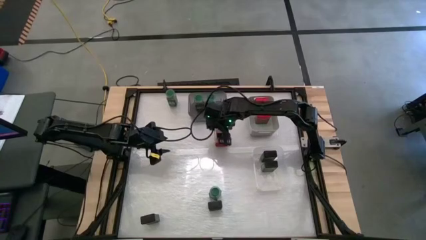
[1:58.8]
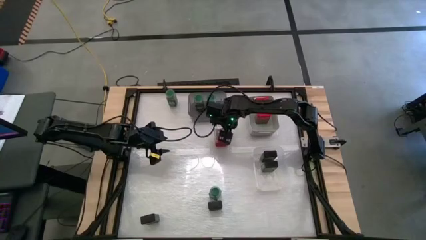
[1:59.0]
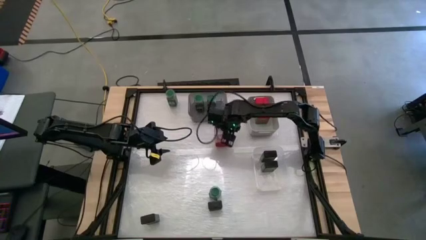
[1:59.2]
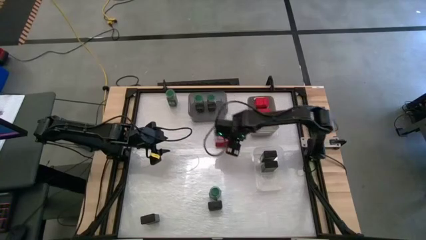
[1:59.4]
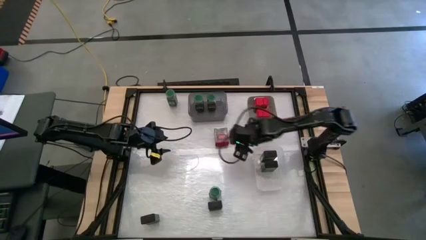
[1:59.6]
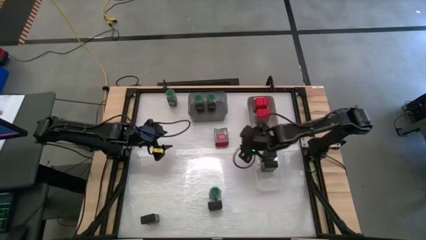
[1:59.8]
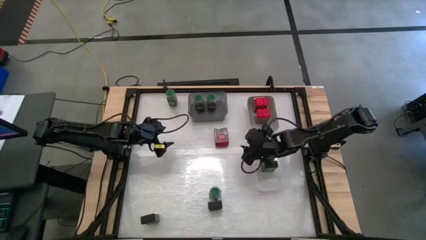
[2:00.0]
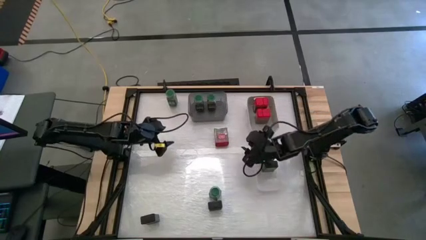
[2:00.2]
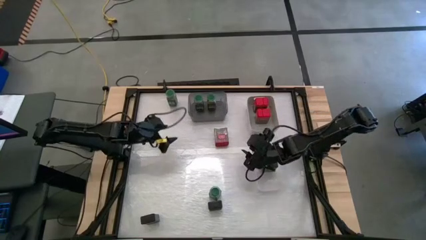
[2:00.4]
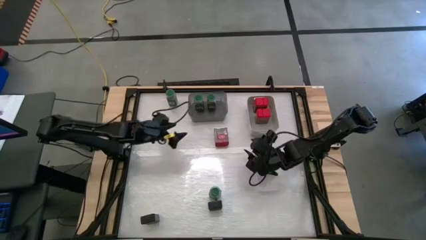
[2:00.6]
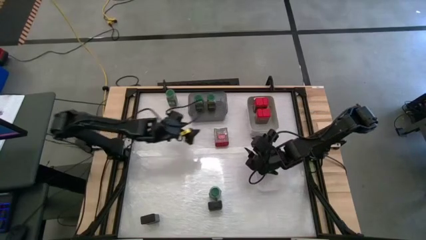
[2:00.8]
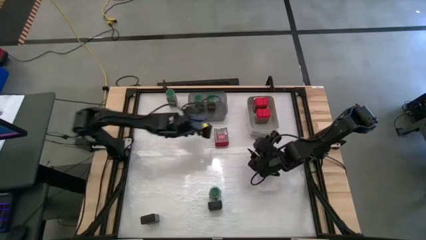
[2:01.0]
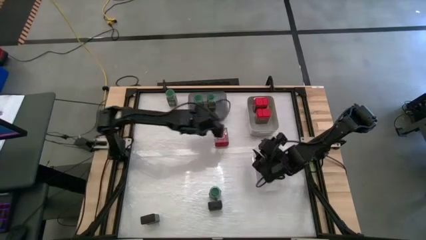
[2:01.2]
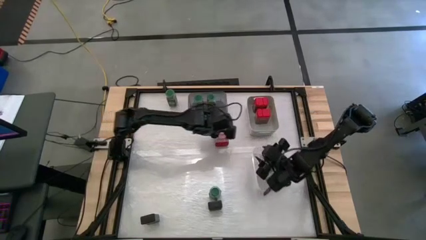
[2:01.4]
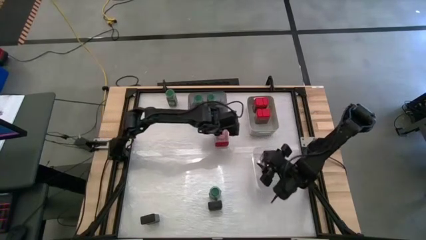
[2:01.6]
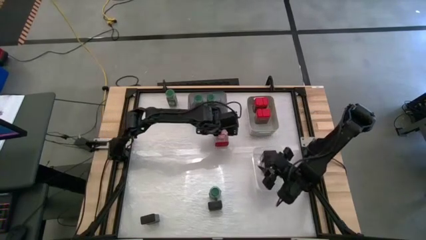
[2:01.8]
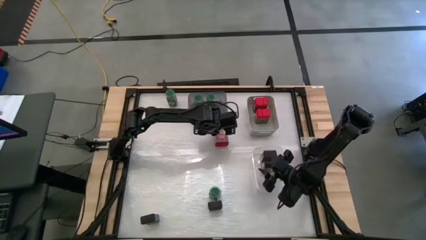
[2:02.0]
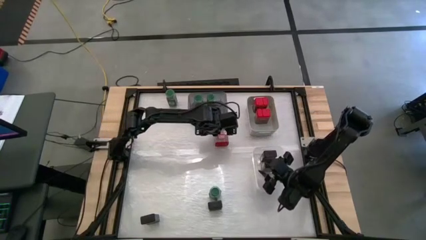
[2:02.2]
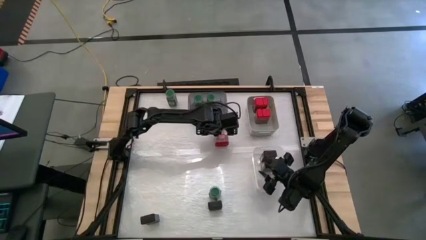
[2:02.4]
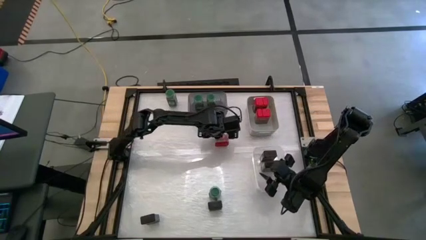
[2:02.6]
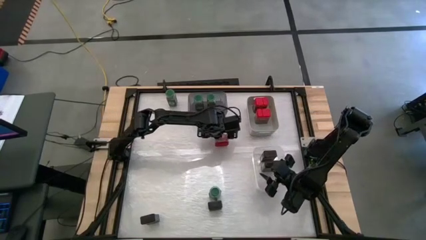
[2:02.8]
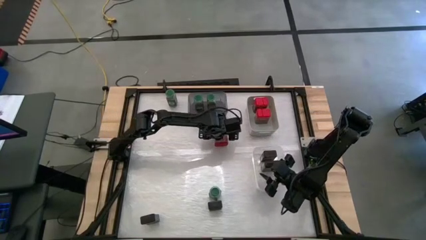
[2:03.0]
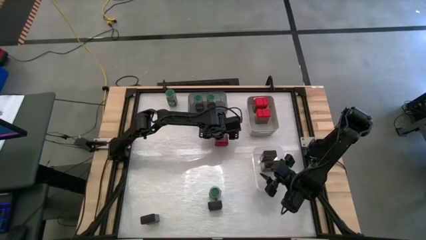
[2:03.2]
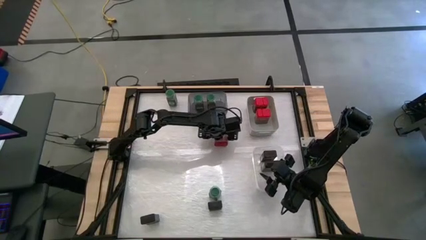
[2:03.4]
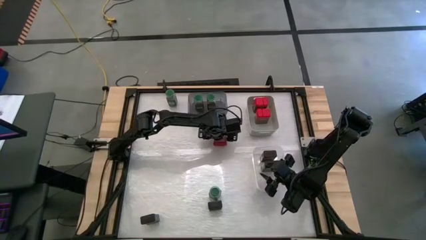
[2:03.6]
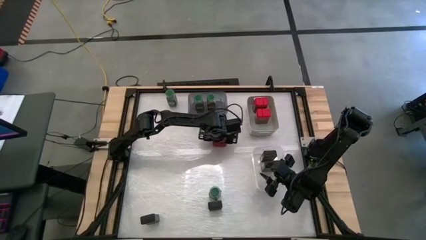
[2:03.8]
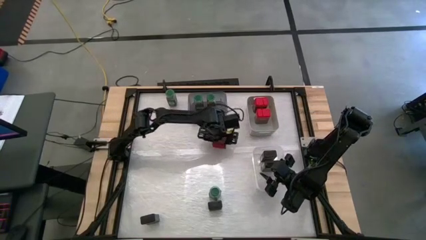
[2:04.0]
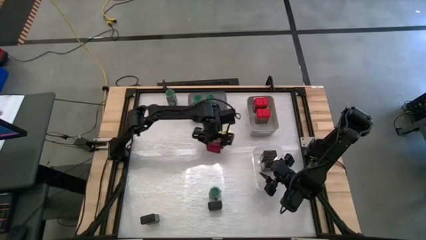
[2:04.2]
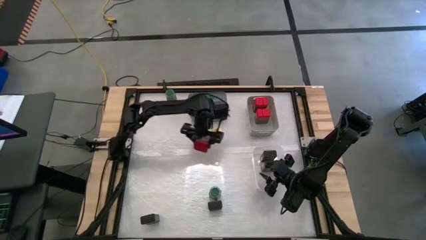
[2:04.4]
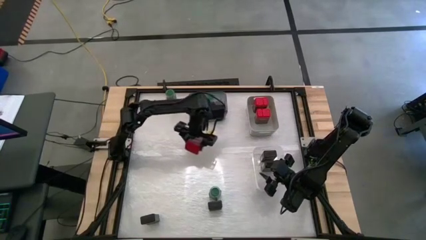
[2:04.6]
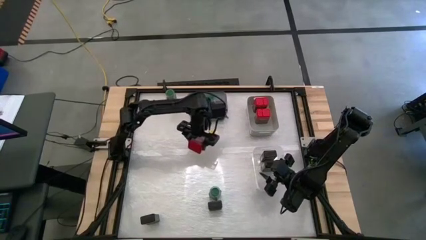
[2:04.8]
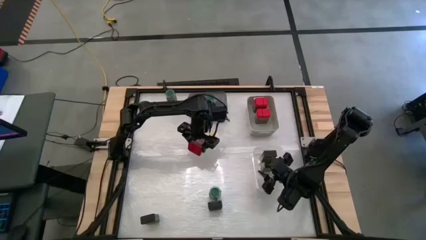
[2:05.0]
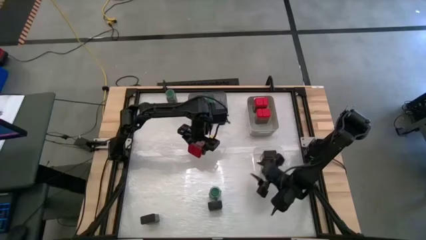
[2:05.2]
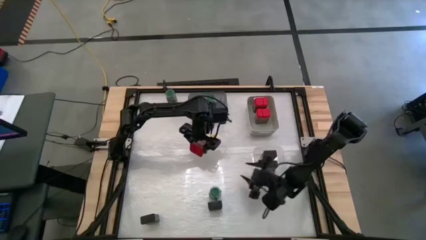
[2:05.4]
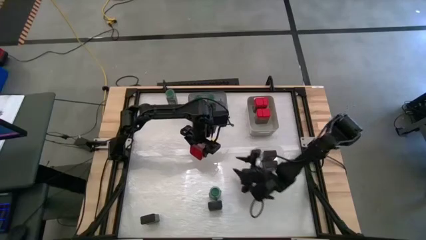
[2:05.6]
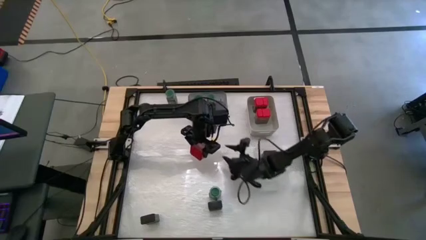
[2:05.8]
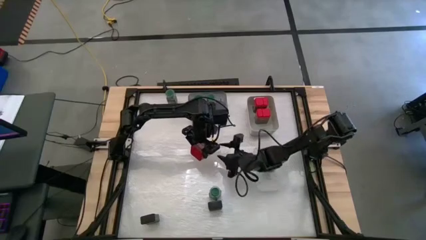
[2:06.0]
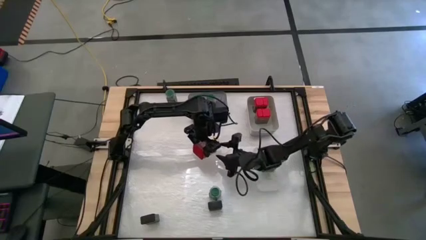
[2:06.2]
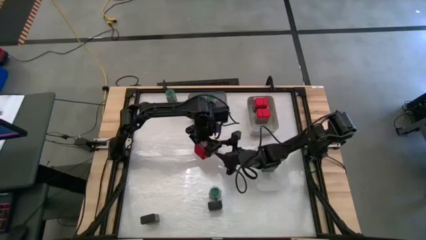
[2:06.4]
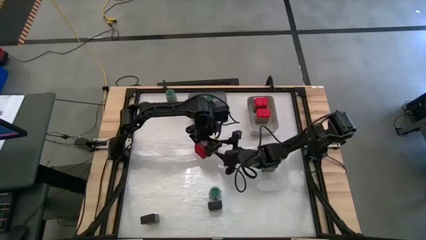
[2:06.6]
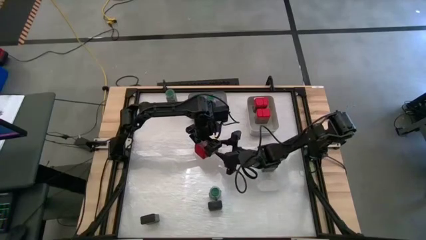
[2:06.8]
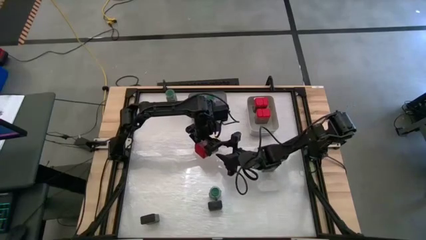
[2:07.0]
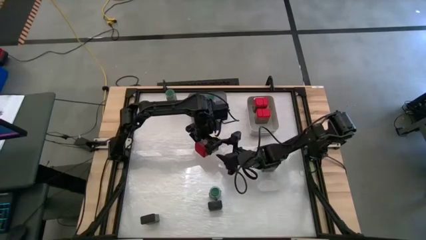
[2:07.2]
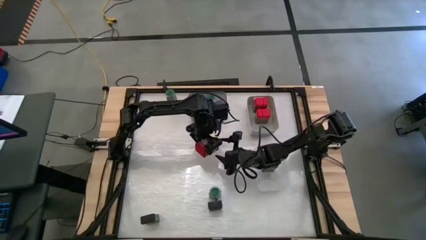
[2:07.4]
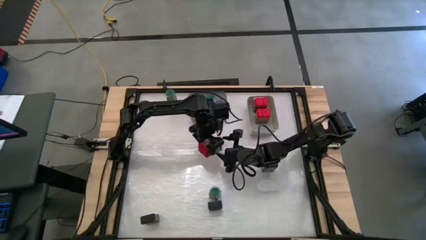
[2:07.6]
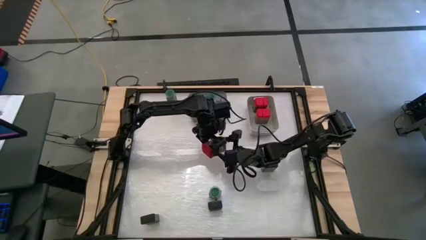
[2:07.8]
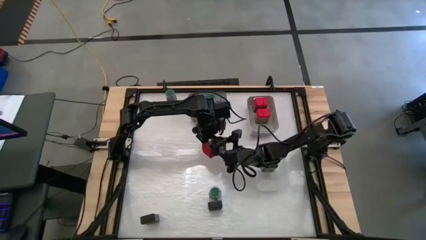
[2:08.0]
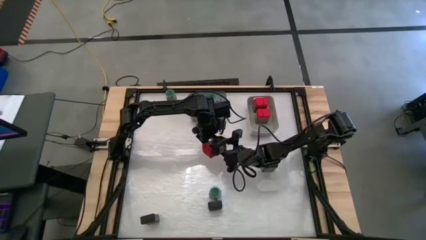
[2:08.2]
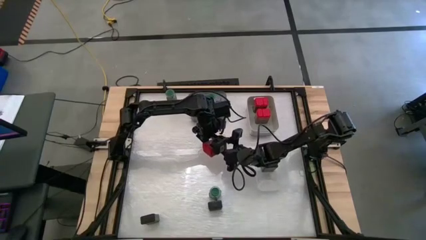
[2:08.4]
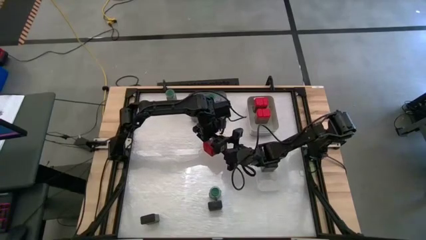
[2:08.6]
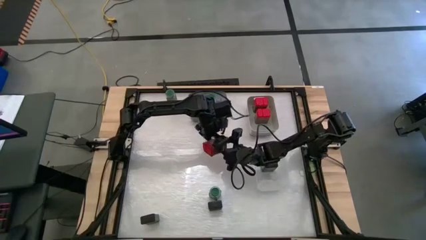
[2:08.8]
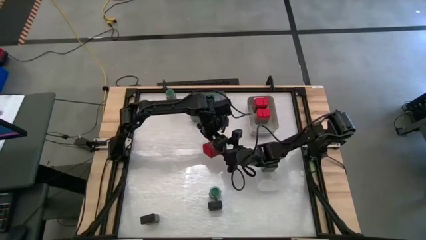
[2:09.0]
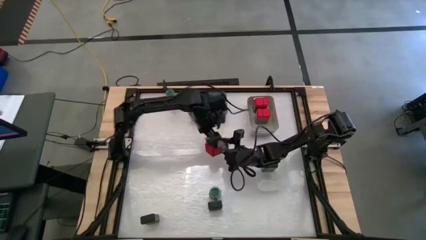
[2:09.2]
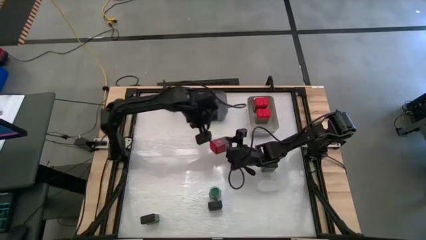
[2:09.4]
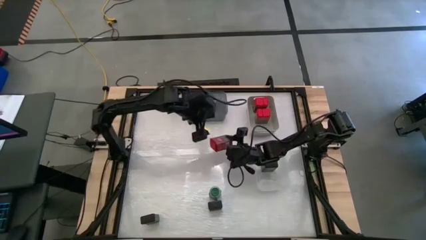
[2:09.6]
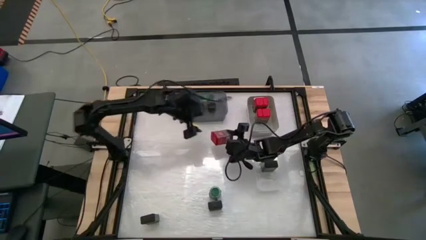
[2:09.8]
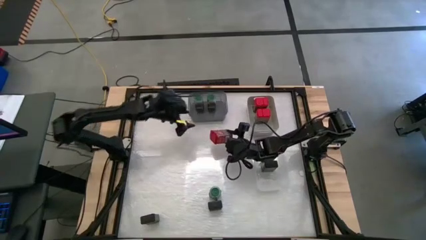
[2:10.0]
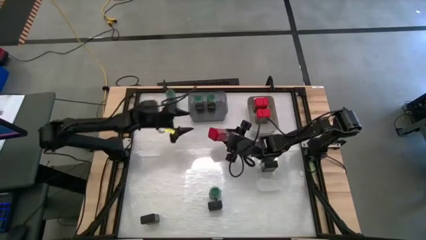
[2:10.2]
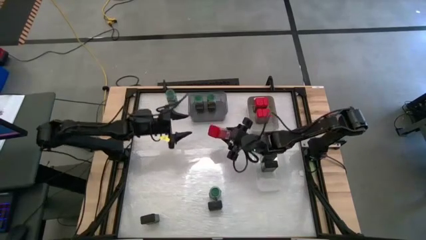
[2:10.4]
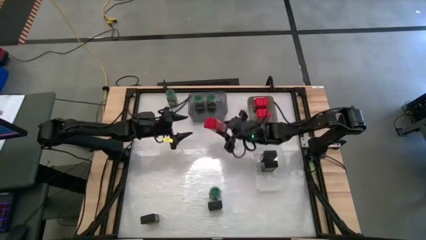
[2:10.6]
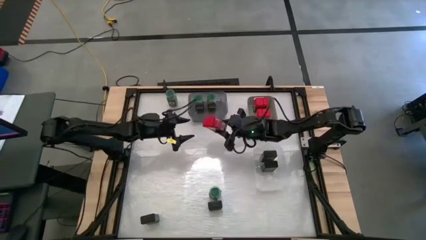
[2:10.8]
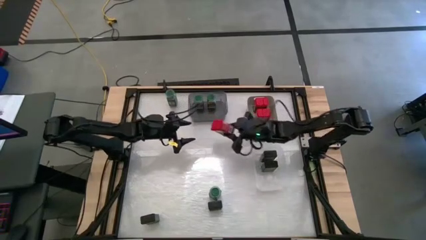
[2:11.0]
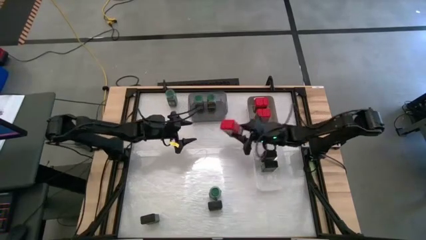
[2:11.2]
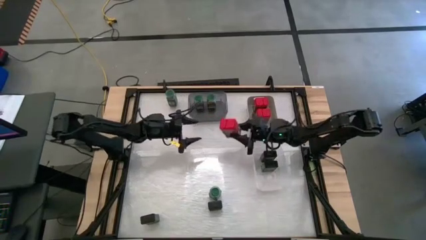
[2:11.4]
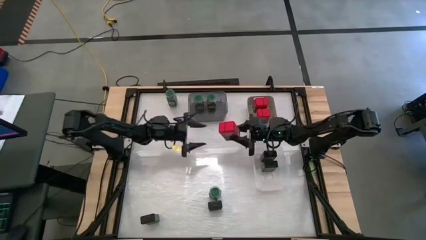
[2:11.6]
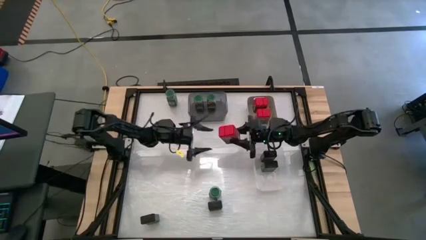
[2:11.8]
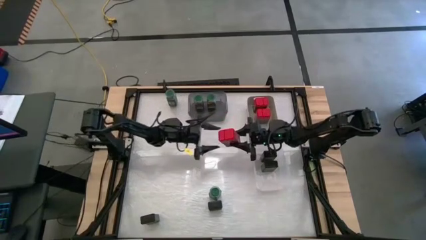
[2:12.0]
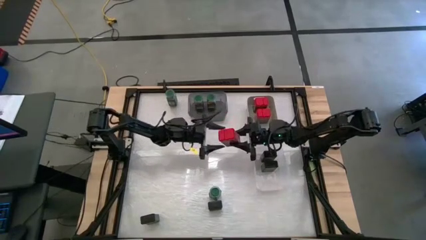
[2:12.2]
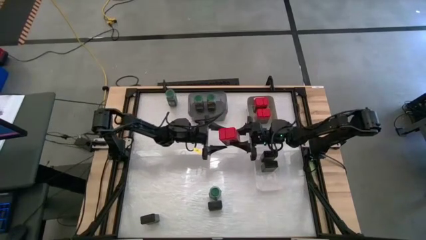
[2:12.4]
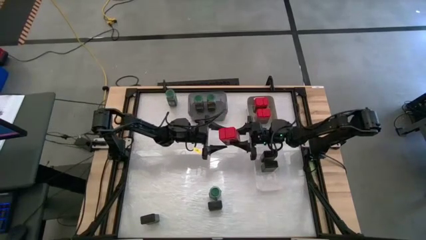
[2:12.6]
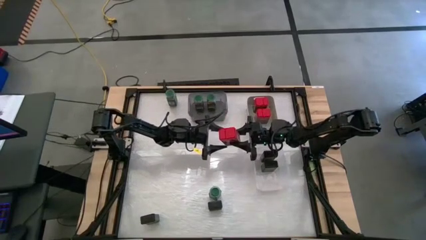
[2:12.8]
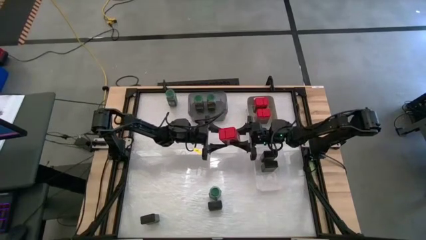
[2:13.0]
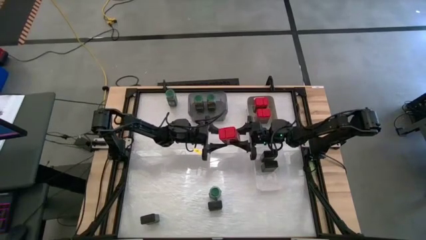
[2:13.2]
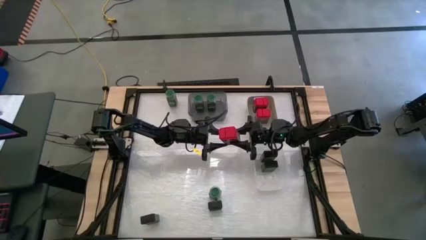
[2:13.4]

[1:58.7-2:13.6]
Task: Sort spices by type
Put the center red seasoning can into the gray bin
